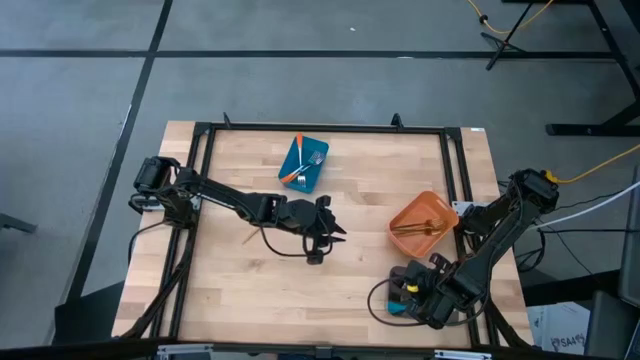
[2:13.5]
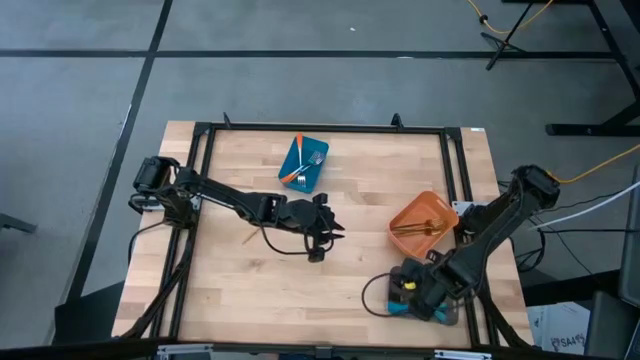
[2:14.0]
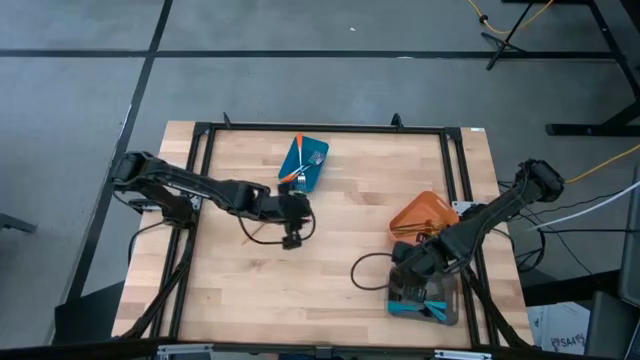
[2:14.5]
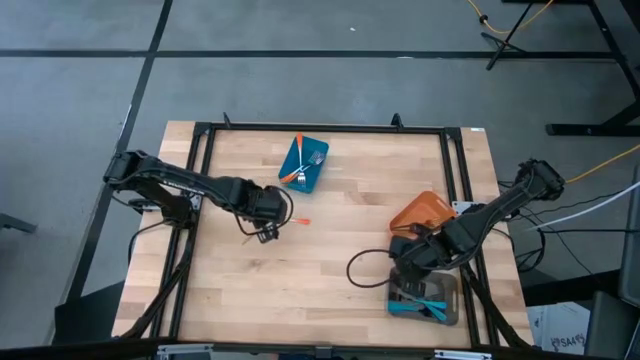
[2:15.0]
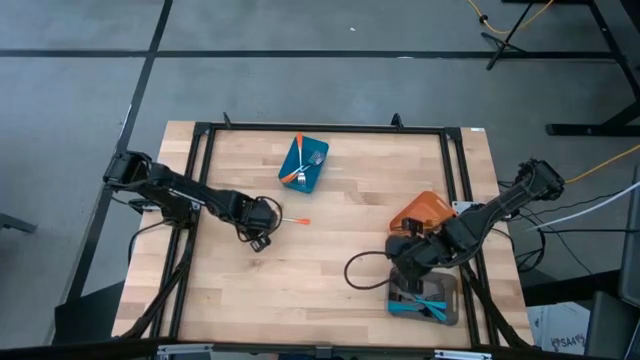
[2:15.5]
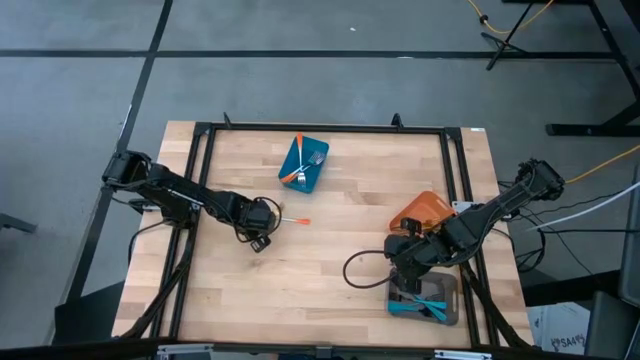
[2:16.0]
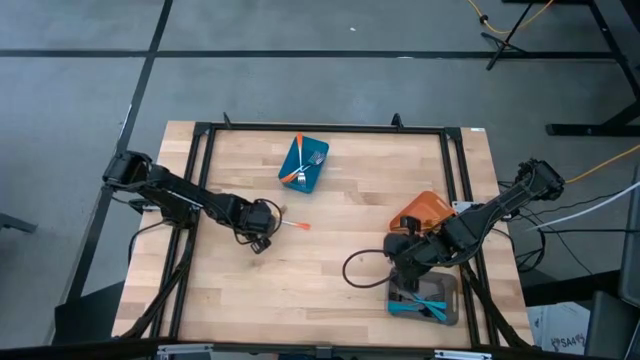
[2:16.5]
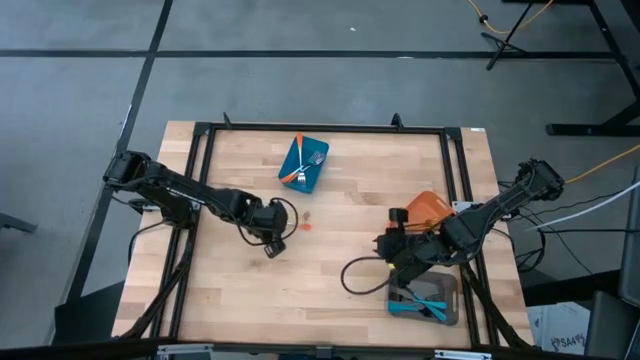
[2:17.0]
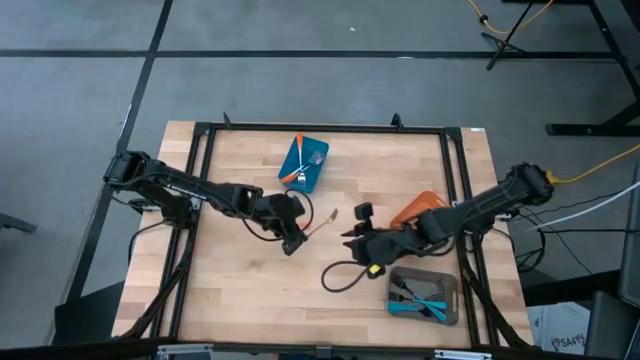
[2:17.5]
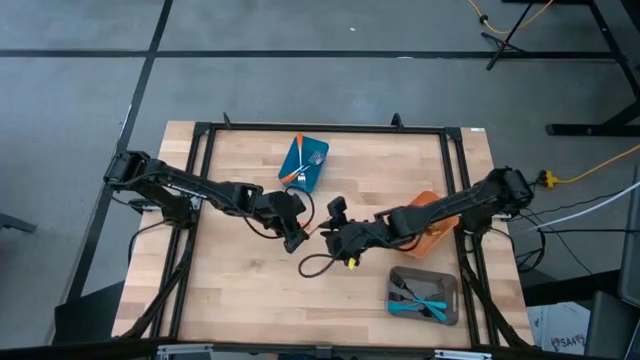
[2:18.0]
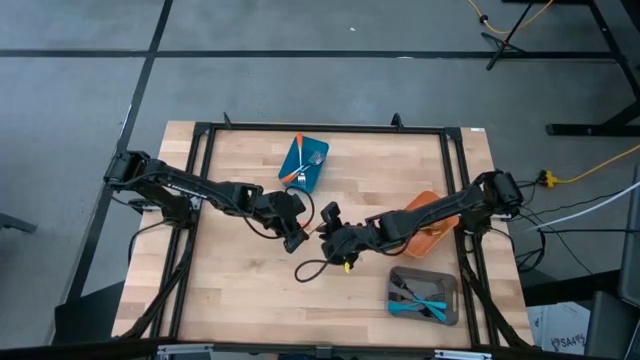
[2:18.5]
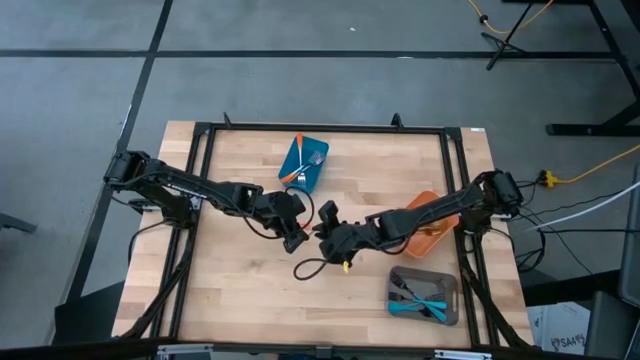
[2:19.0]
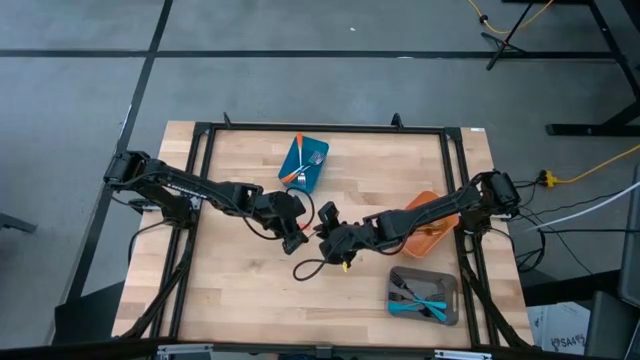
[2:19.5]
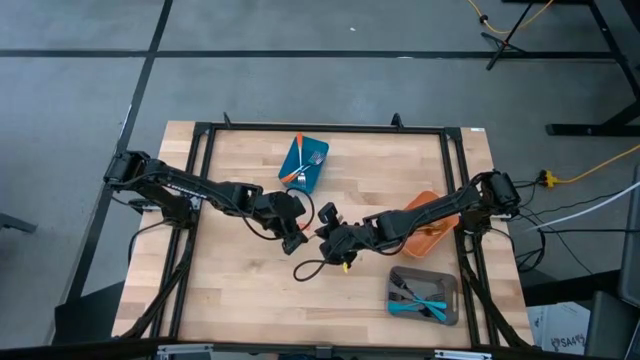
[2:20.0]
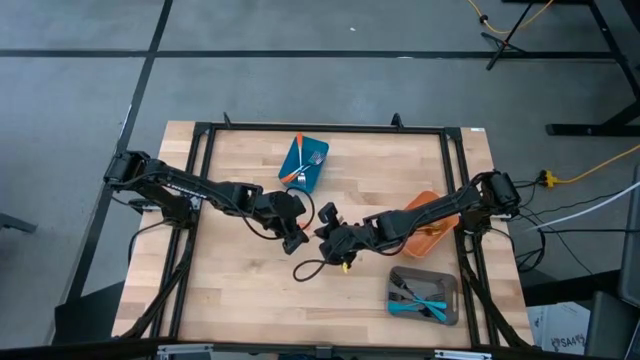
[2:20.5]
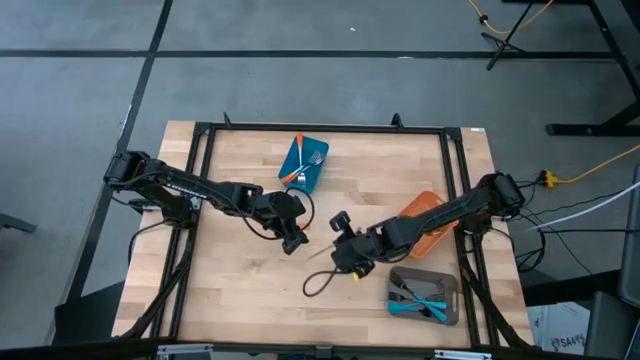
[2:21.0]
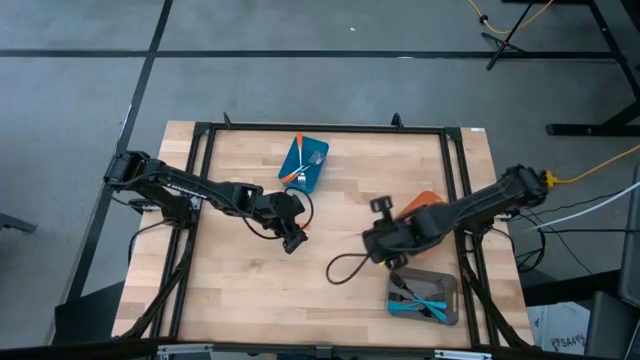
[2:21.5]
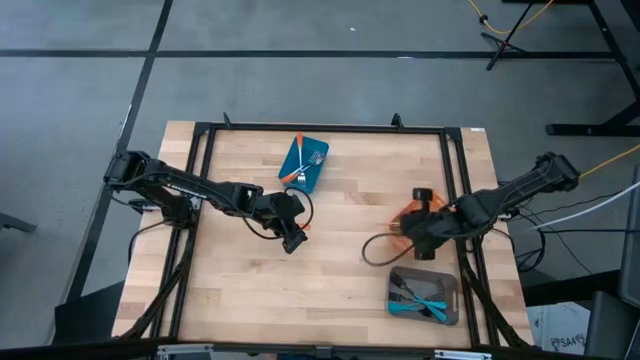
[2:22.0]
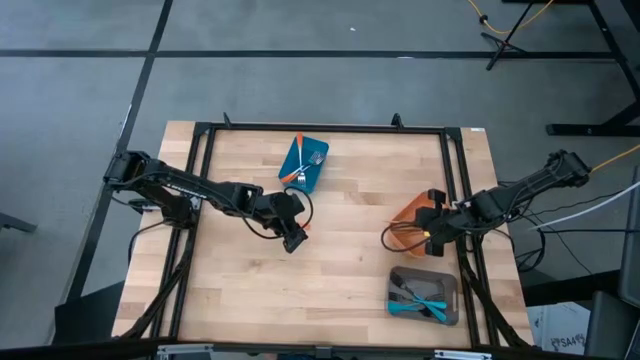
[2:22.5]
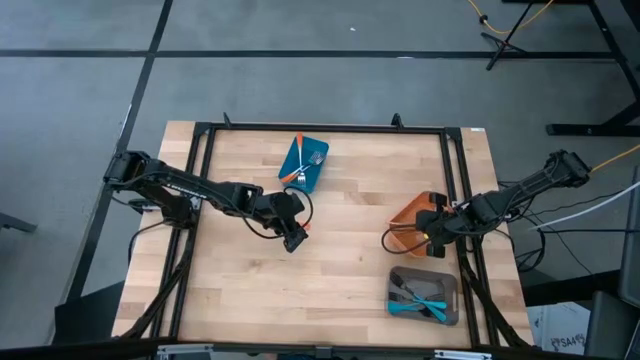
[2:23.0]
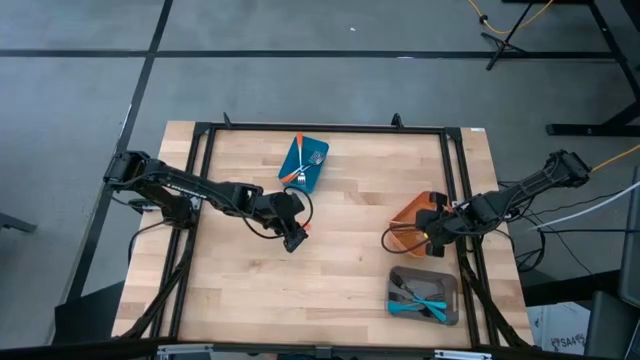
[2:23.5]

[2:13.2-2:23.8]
Task: Sort silverware by color (type)
Put the gold fork into the orange bin

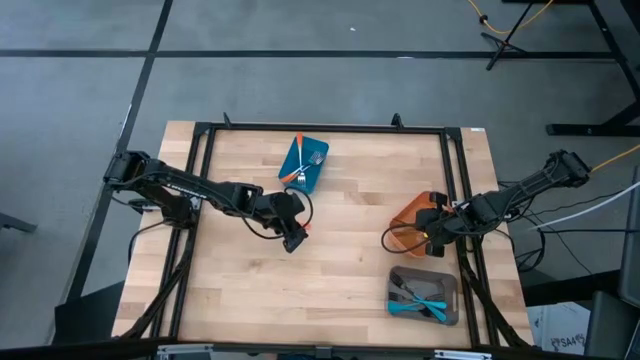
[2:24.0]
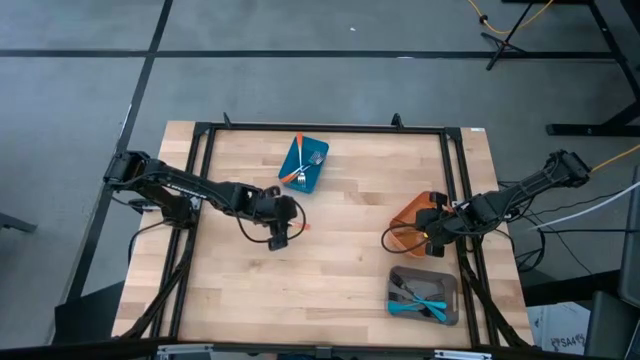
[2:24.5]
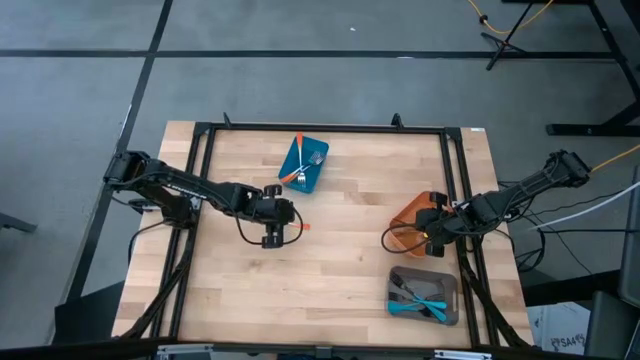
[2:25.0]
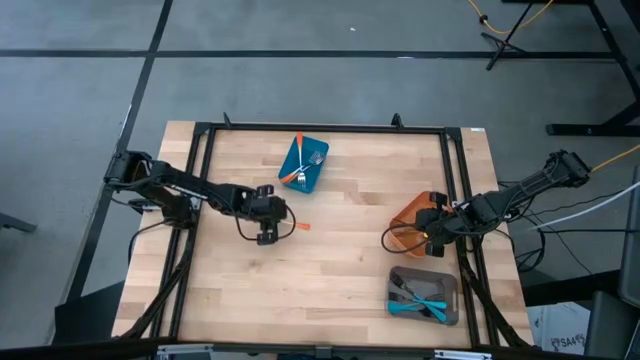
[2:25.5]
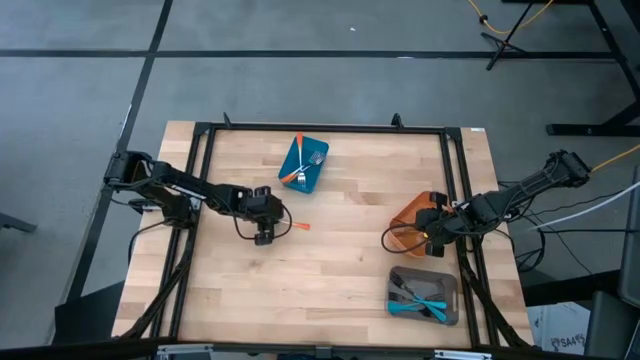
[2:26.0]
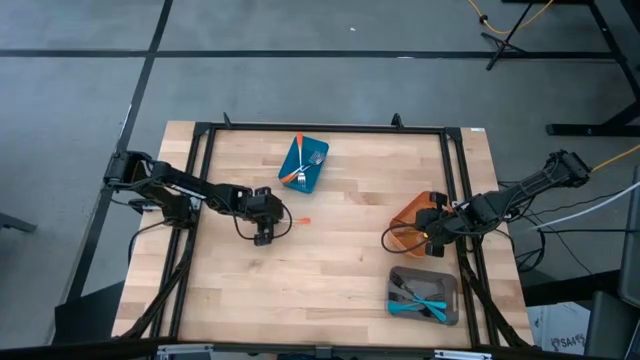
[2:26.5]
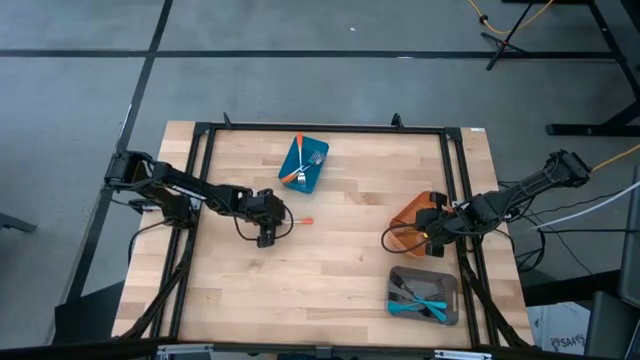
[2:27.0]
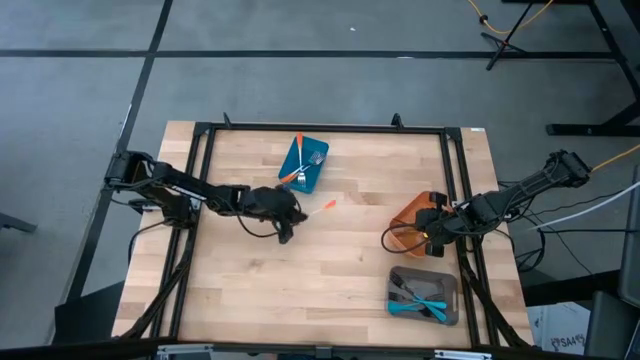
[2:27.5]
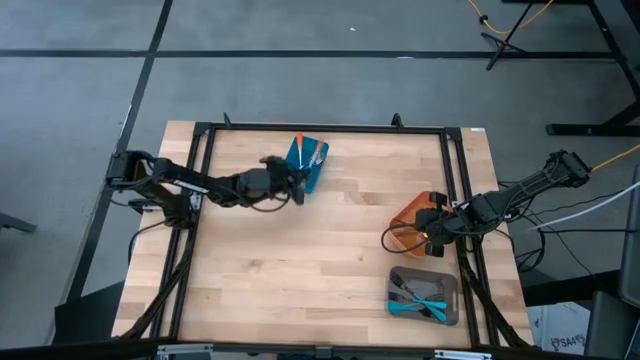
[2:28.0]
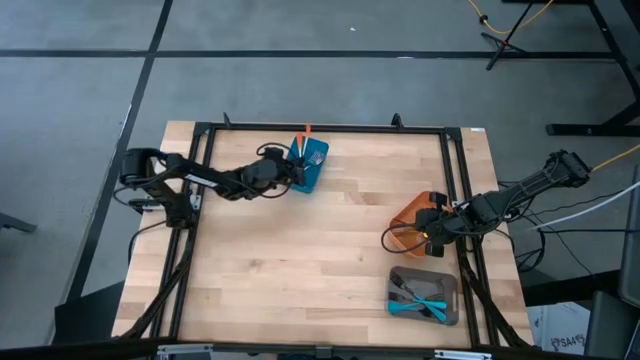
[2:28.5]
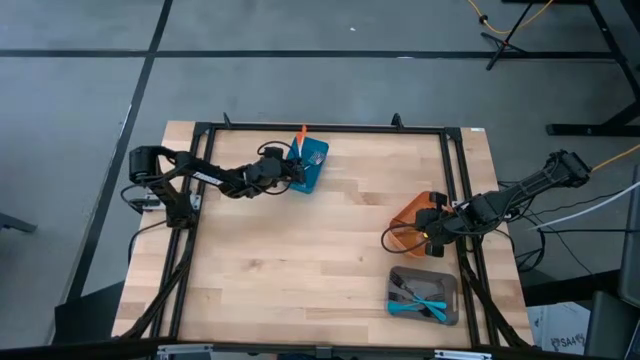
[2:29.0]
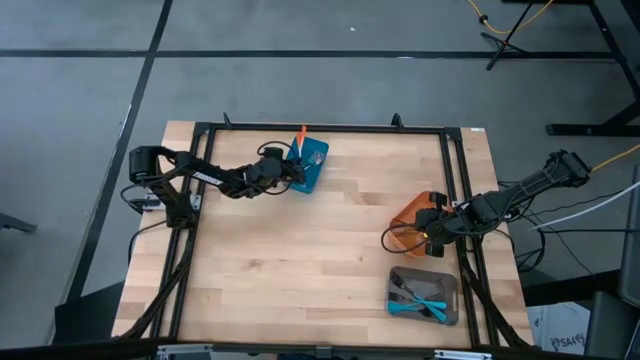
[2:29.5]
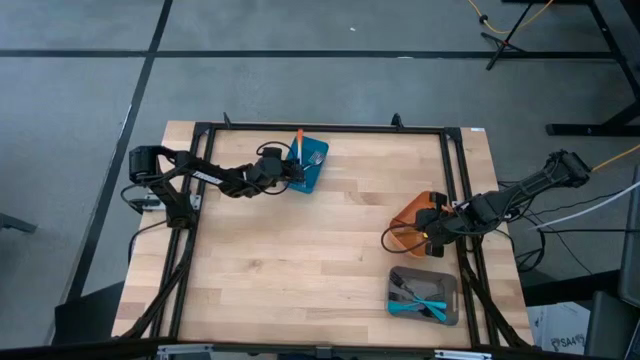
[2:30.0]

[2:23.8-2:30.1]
Put the orange fork into the blue bin

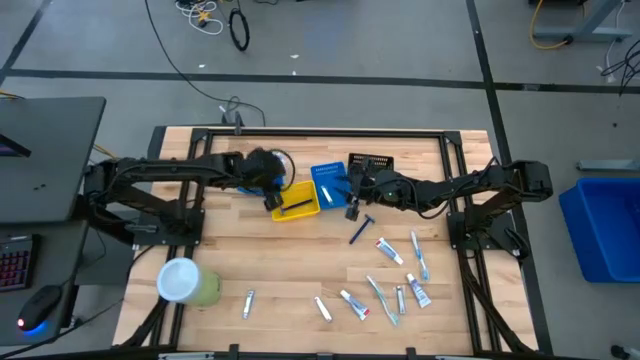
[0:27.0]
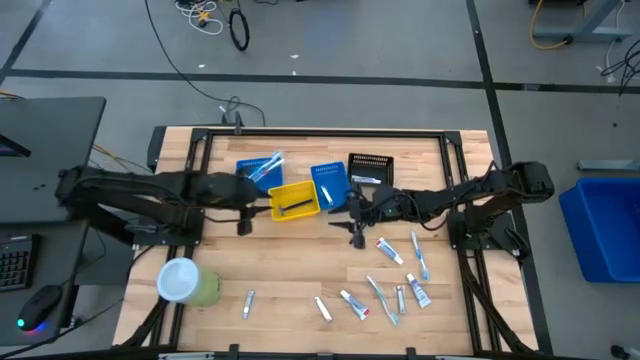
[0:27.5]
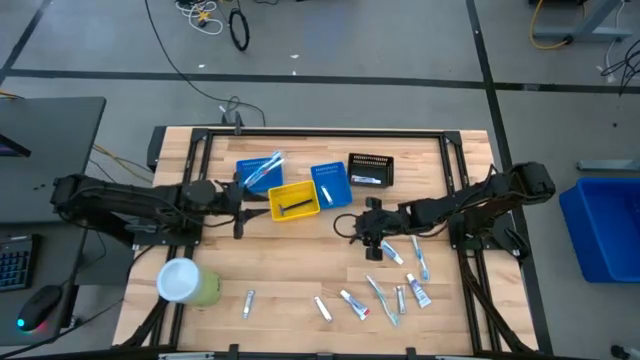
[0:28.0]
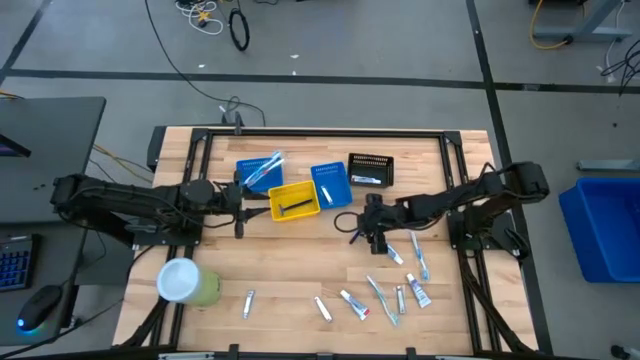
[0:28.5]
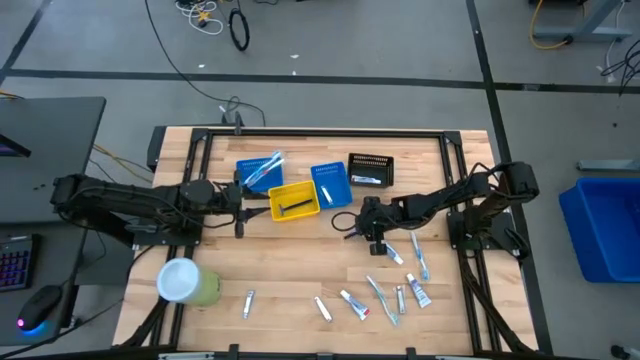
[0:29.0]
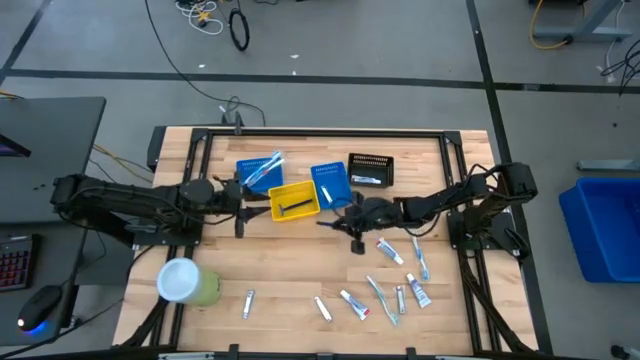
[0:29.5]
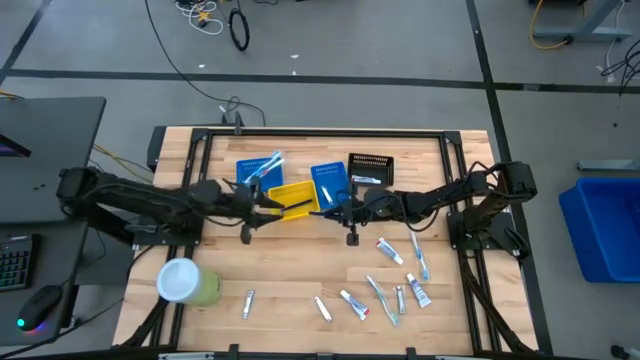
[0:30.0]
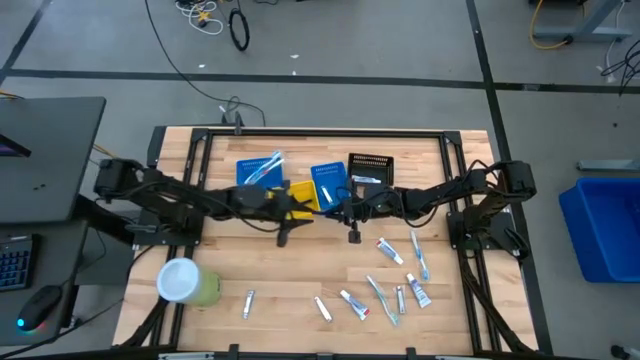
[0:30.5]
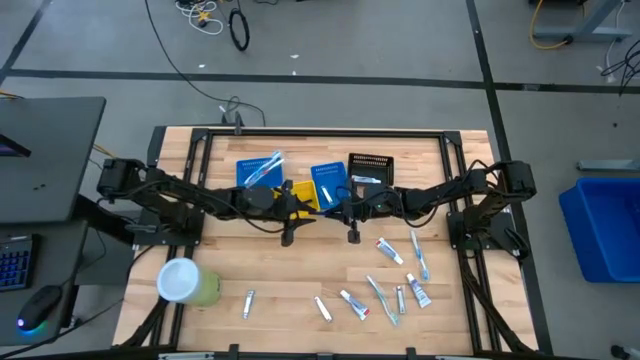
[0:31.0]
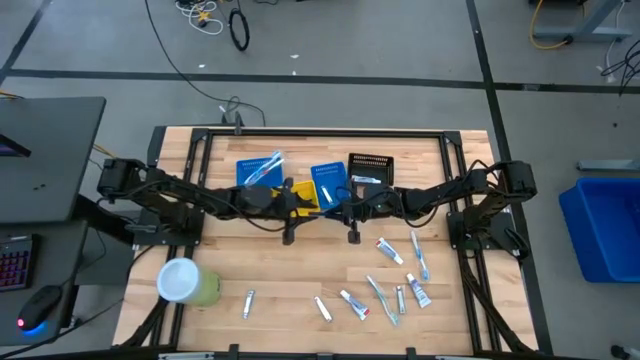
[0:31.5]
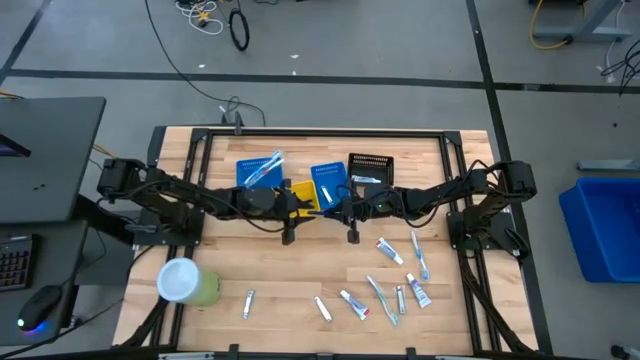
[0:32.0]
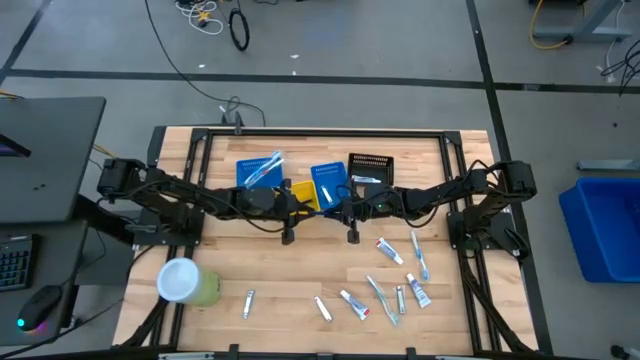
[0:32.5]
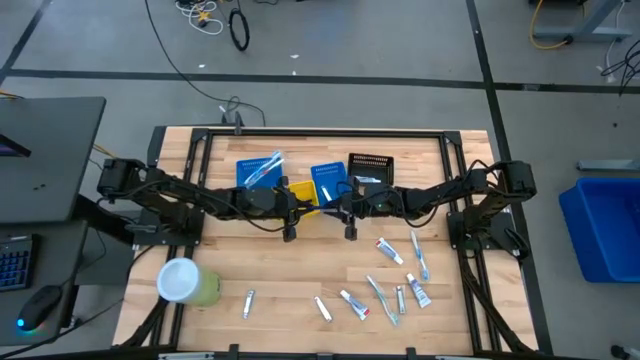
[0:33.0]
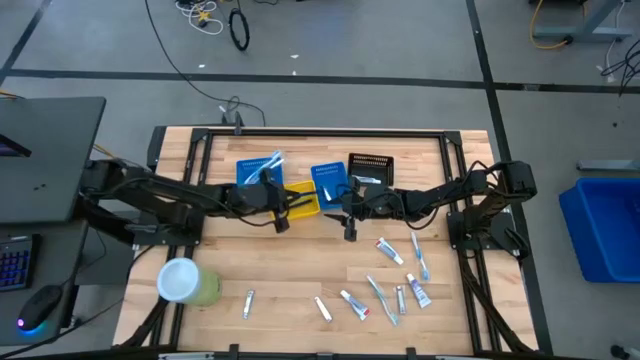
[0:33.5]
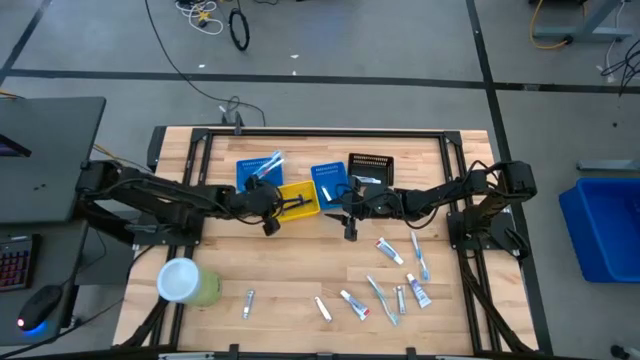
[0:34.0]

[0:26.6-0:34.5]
Task: Pick & Place Travel size toiletries
Put the razor into the yellow bin
